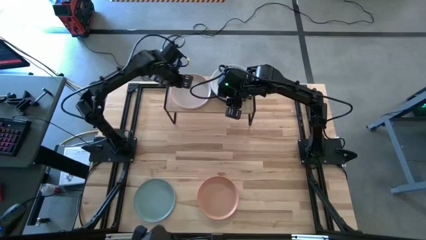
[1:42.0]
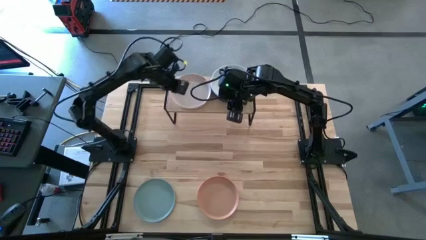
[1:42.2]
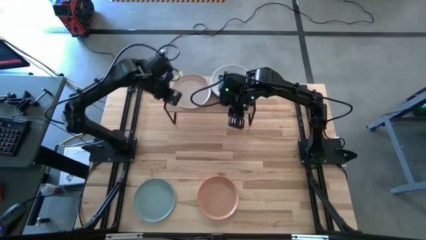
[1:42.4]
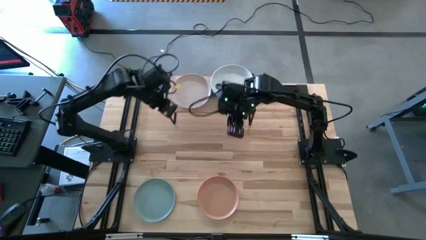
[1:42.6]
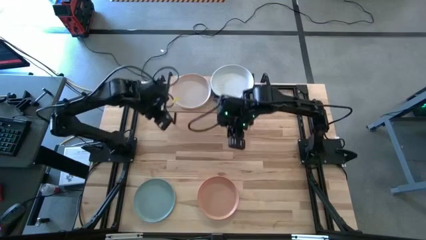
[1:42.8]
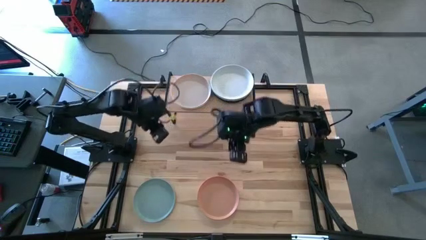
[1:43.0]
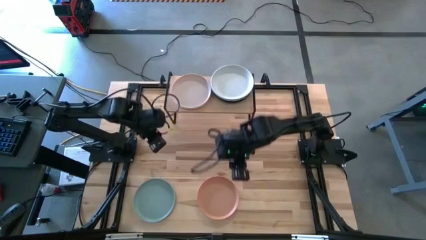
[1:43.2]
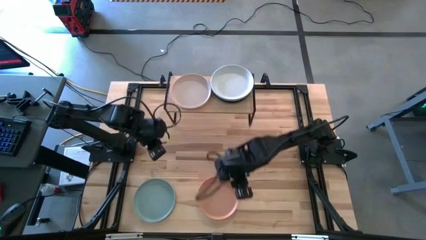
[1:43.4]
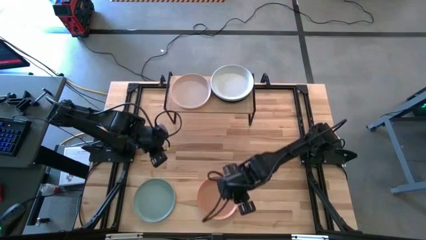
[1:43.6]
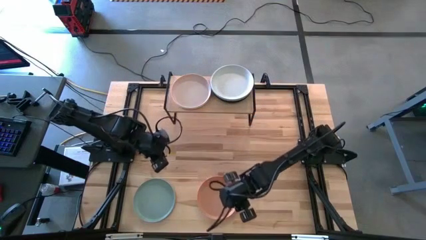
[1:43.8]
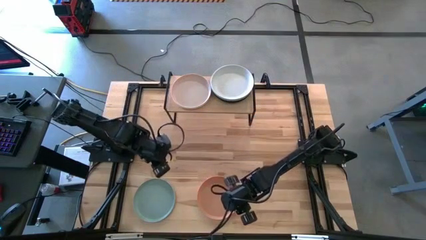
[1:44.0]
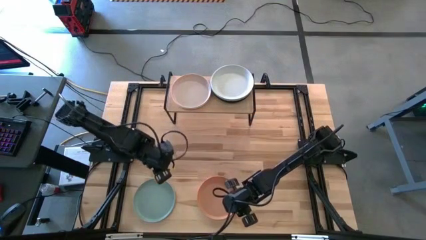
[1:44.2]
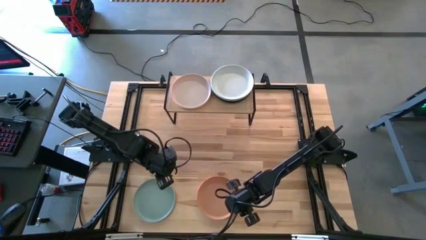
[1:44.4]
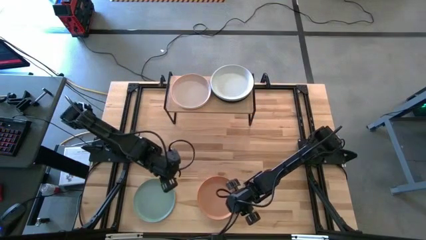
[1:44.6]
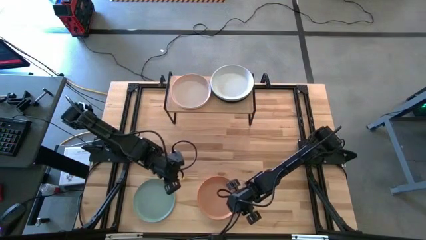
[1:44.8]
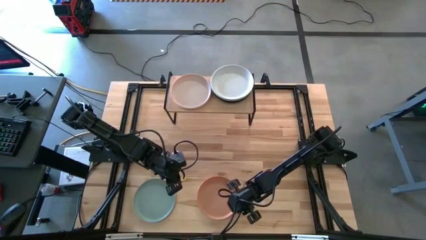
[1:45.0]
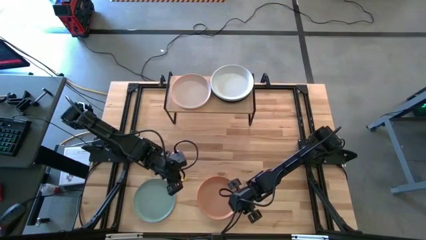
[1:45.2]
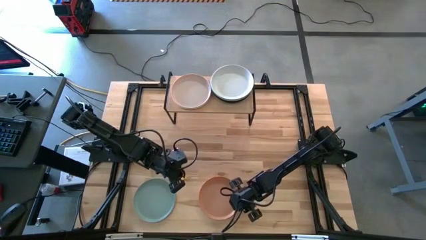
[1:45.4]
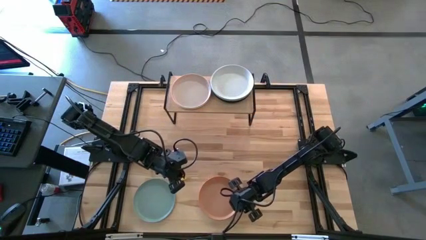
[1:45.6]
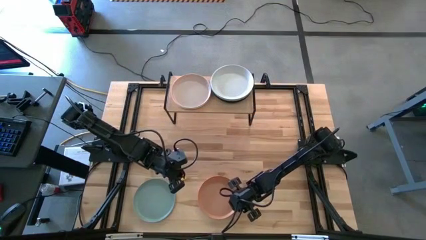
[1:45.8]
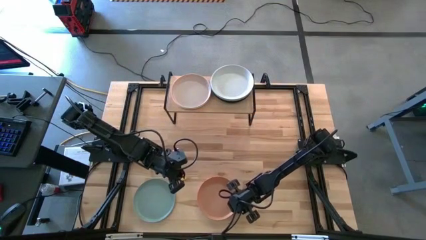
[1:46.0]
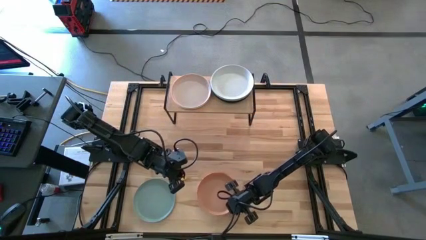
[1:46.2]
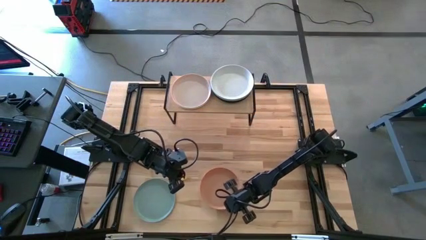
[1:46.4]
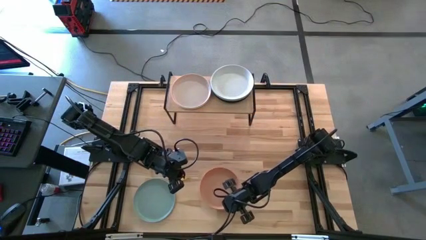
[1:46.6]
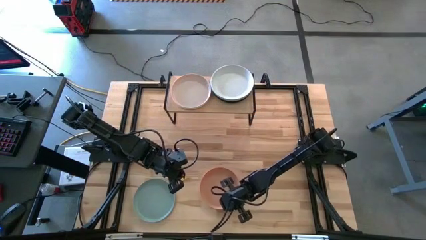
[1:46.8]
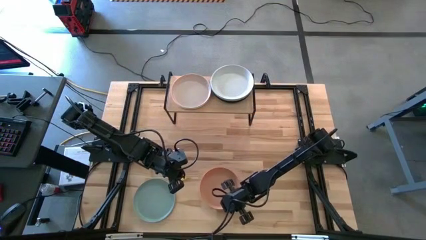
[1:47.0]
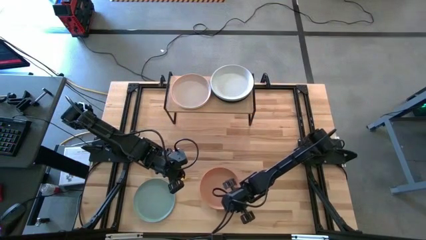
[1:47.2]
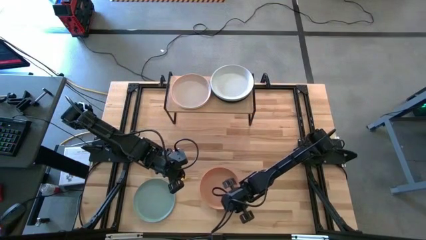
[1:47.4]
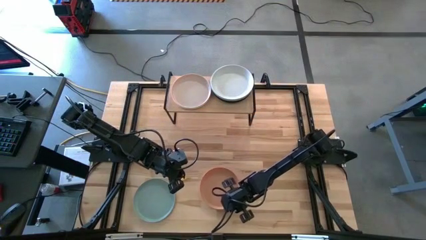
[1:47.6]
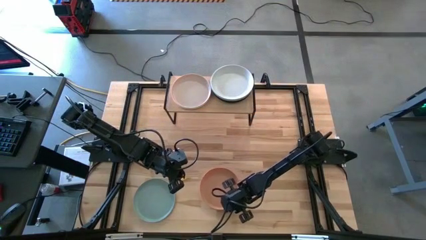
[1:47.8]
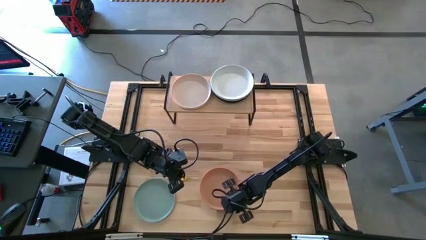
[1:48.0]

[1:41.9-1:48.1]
Task: Place and stack plates onto a shelf
Stack the orange plate on top of the gray plate

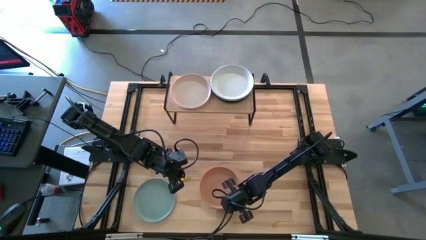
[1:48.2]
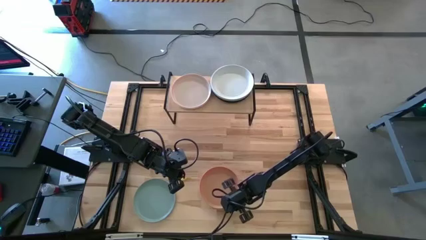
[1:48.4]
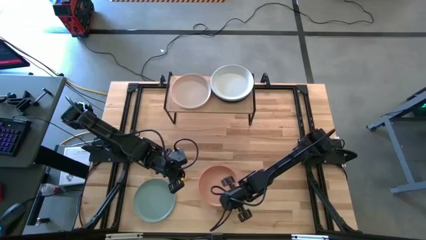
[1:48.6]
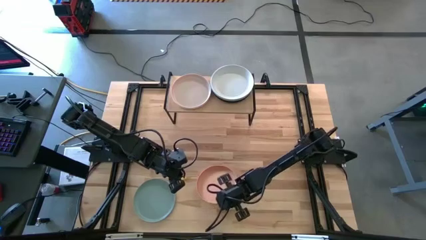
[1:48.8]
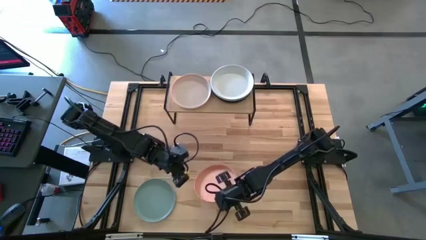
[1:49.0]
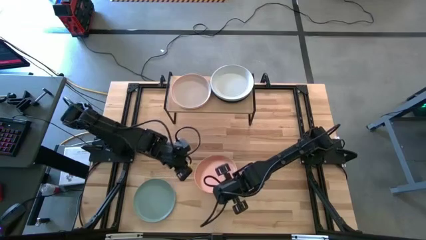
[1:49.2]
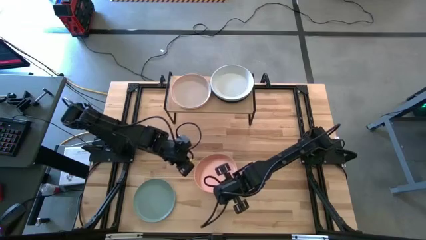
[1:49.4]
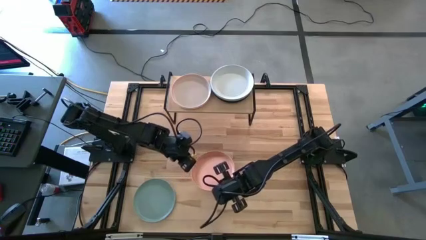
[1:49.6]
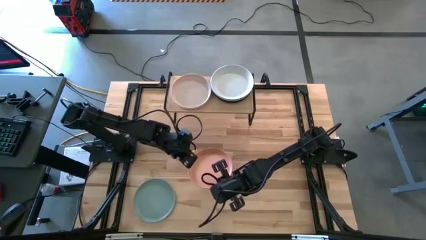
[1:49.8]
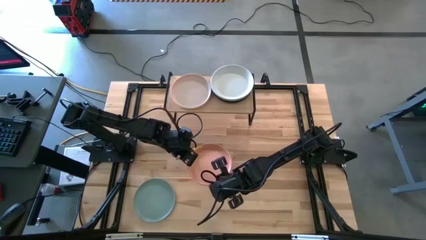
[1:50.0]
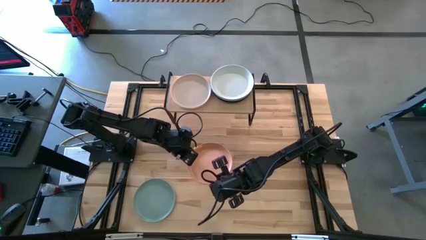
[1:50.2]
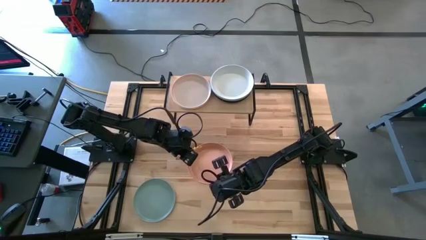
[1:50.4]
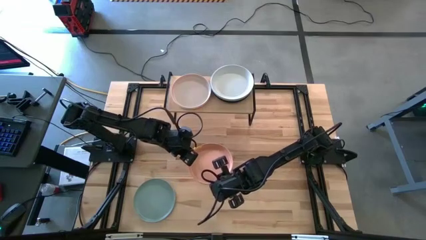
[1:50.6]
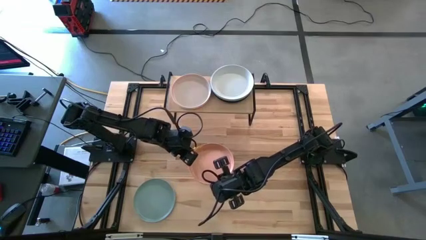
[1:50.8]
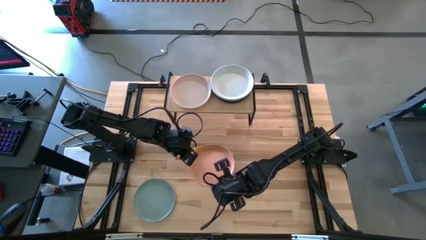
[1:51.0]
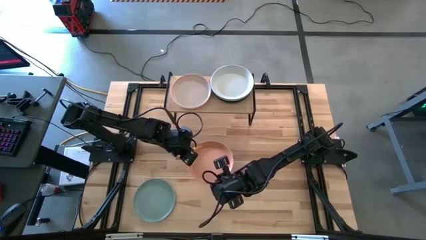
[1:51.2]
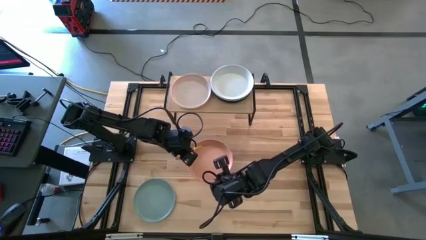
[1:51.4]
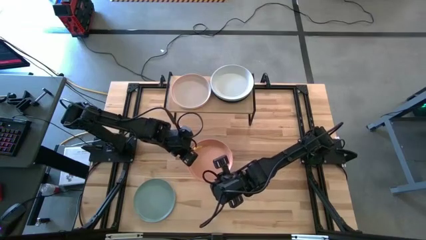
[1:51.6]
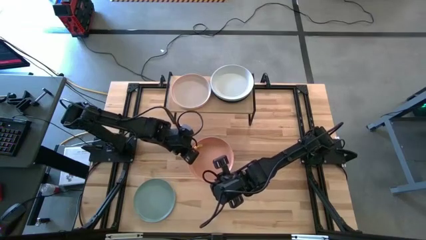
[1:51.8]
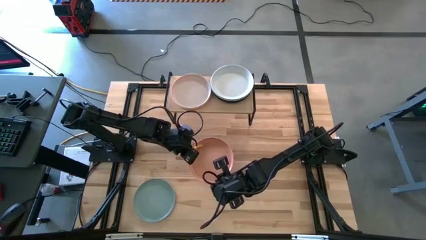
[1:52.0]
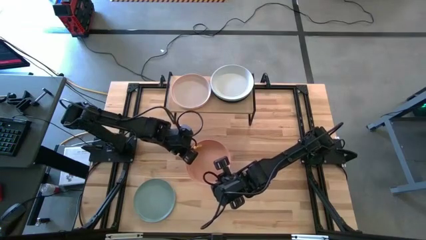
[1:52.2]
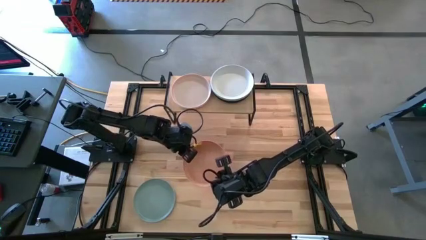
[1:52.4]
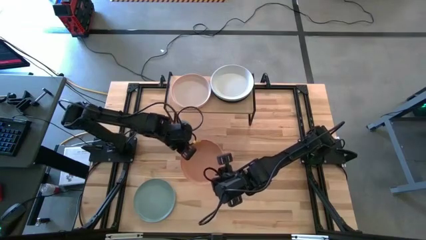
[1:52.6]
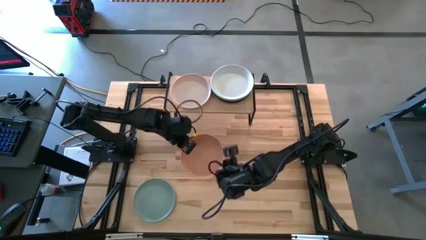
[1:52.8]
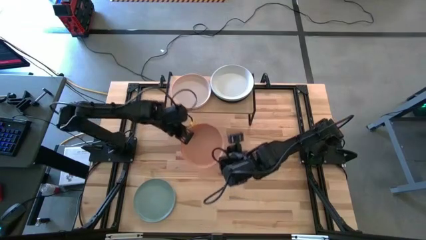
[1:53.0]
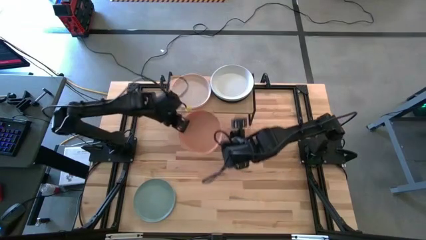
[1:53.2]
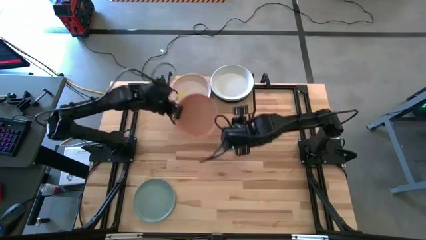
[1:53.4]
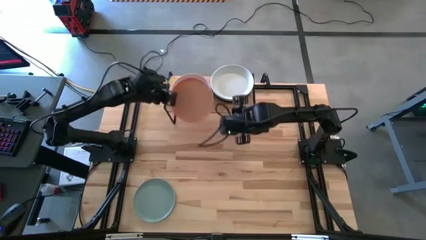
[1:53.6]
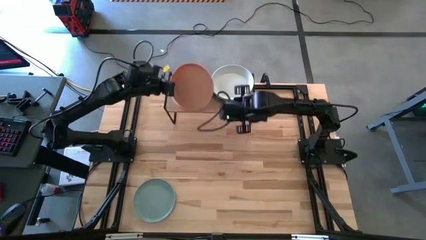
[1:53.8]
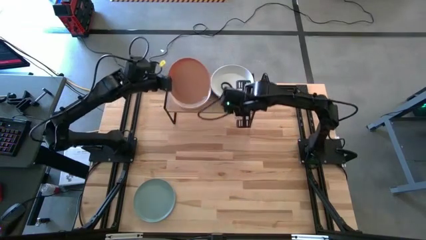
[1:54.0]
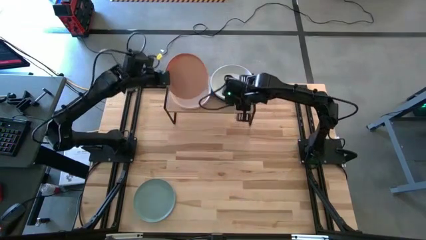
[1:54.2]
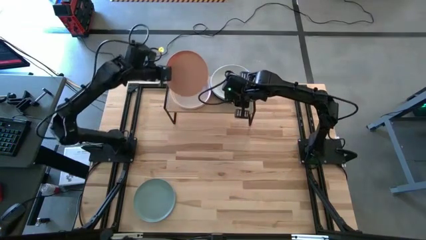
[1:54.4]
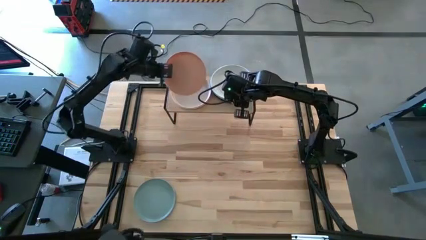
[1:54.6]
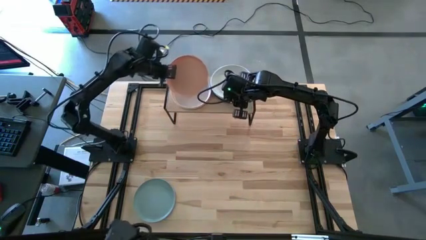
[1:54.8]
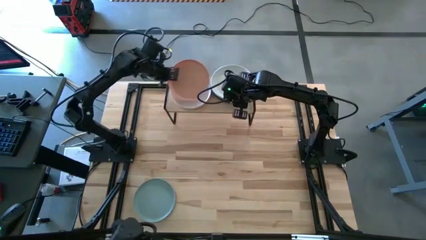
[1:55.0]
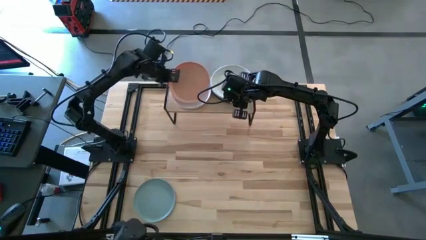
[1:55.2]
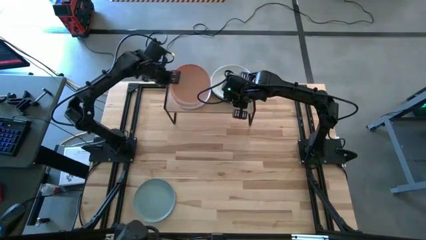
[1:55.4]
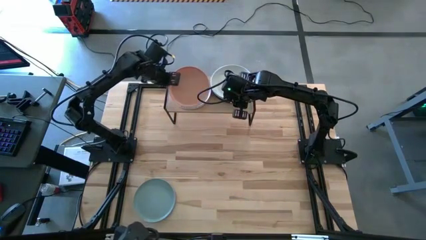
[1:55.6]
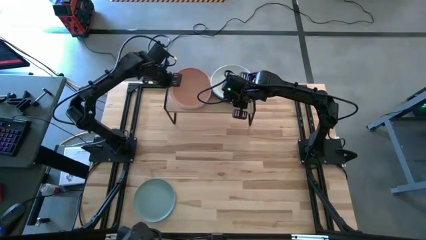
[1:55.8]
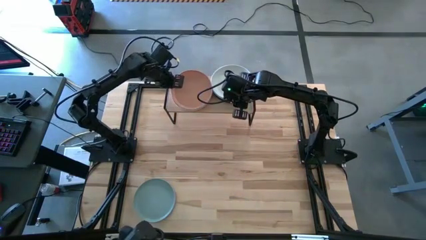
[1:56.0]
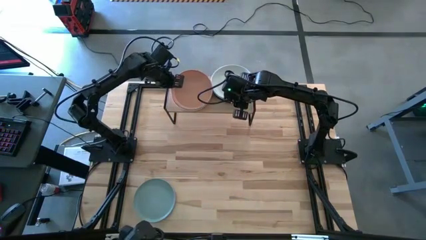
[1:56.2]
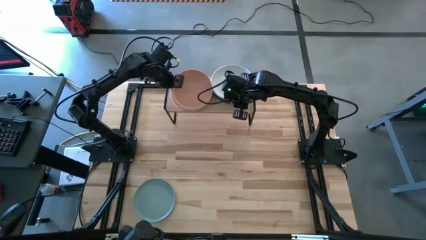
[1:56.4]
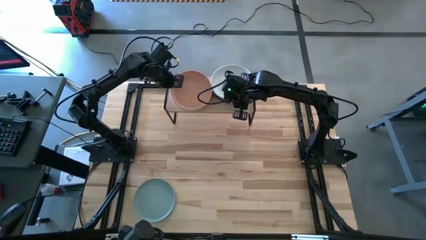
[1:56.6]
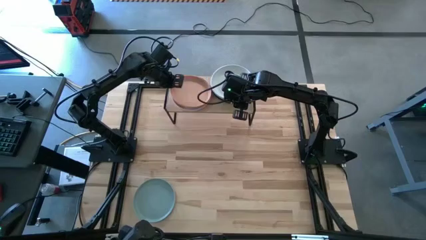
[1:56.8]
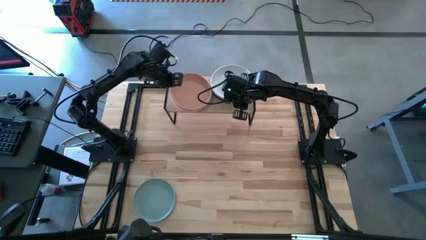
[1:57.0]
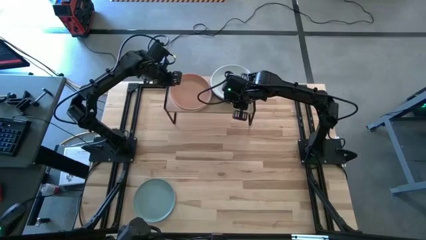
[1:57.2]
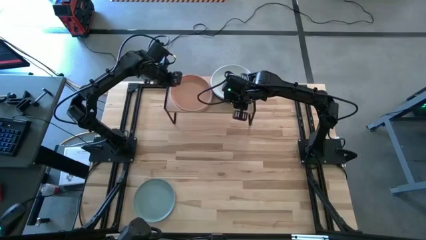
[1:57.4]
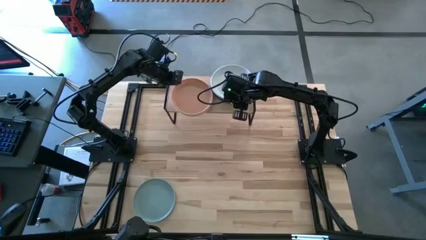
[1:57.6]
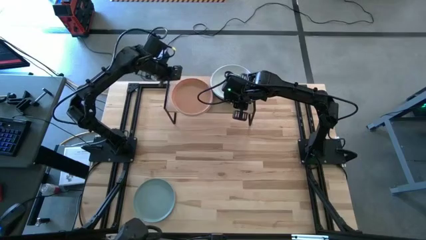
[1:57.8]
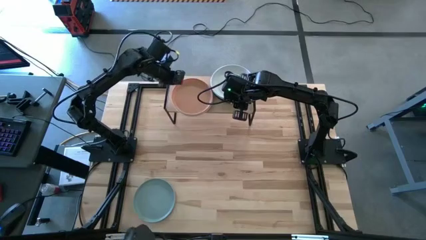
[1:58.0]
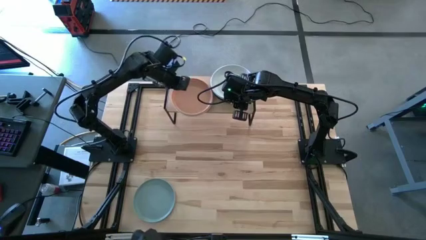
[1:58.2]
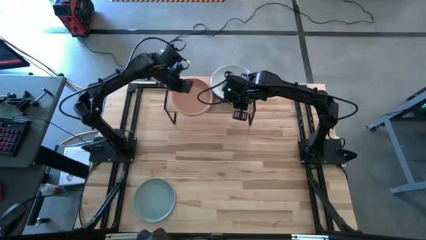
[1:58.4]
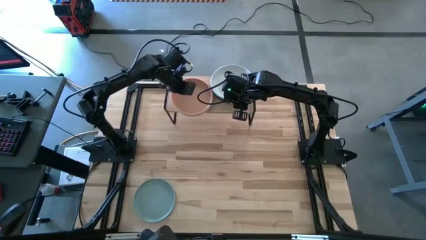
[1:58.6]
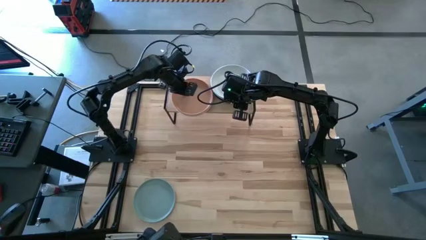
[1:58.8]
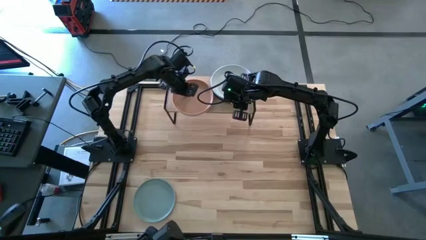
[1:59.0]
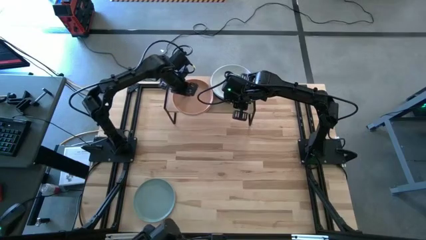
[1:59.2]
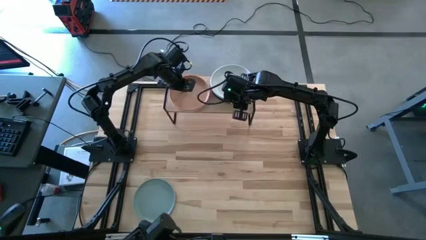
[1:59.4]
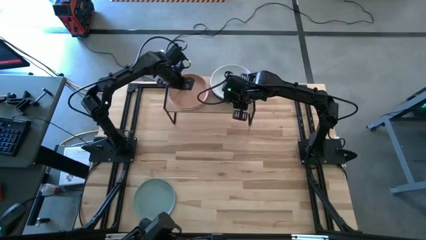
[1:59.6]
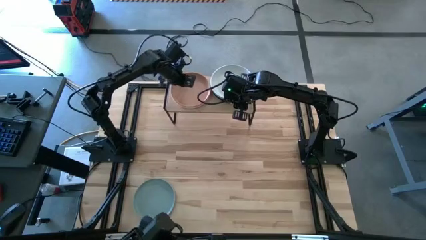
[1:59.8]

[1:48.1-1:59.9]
Stack the orange plate on top of the gray plate
